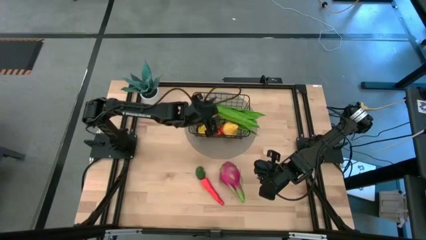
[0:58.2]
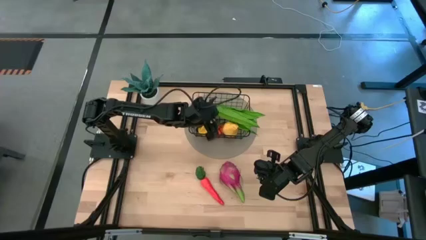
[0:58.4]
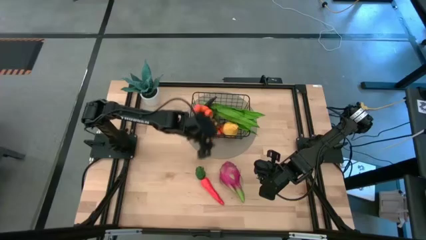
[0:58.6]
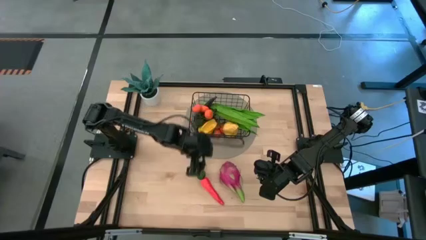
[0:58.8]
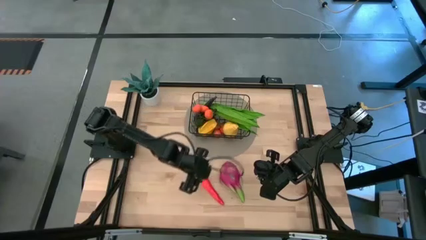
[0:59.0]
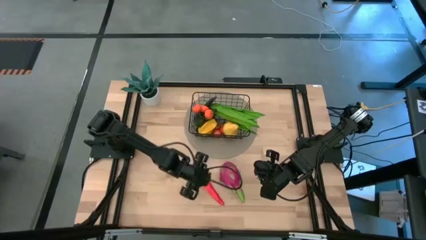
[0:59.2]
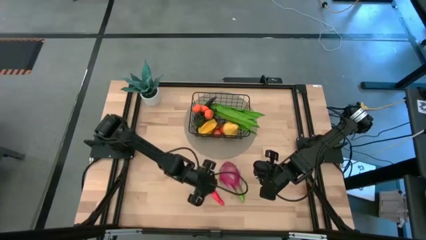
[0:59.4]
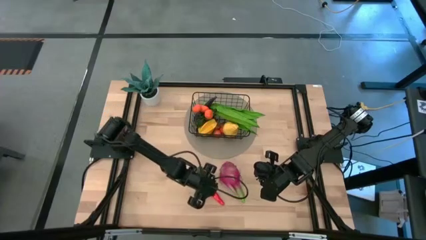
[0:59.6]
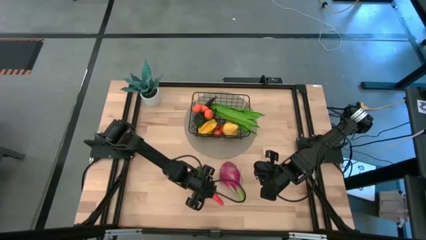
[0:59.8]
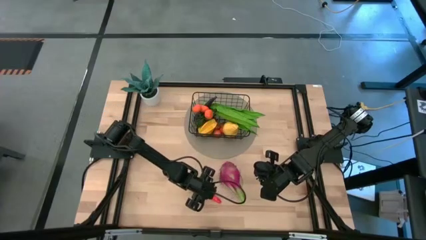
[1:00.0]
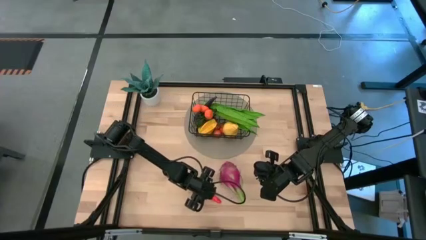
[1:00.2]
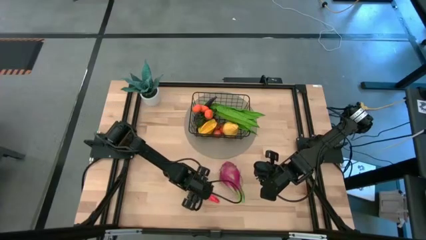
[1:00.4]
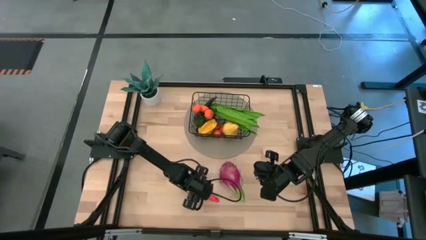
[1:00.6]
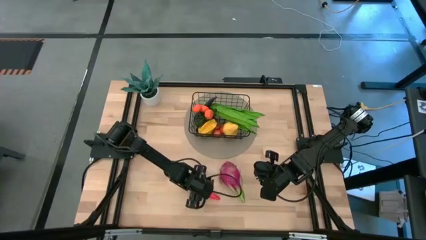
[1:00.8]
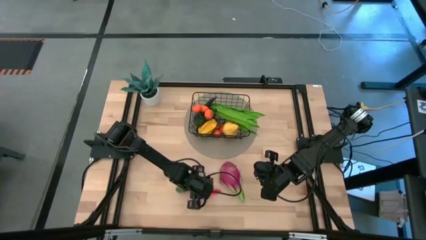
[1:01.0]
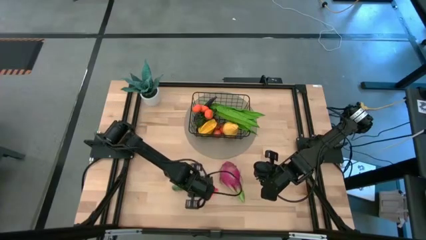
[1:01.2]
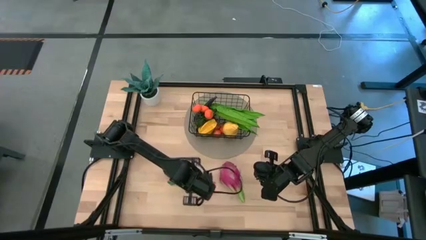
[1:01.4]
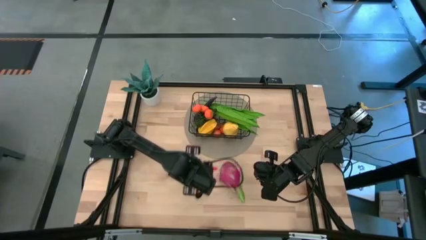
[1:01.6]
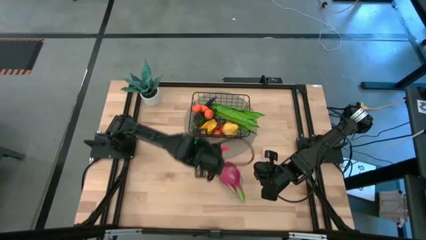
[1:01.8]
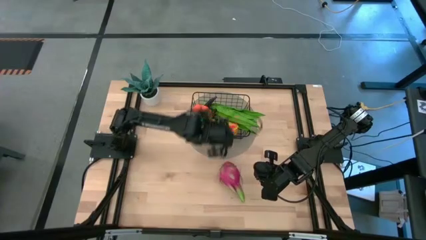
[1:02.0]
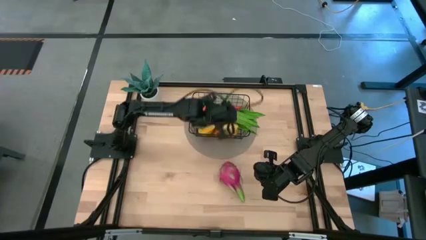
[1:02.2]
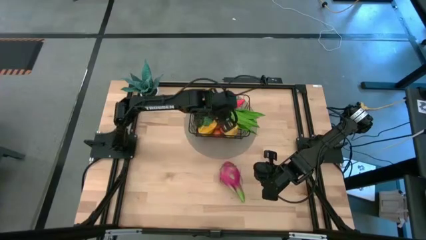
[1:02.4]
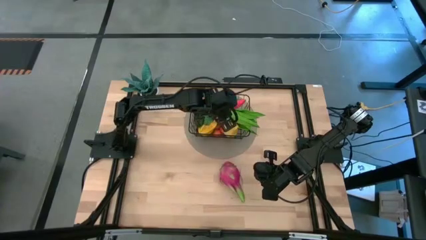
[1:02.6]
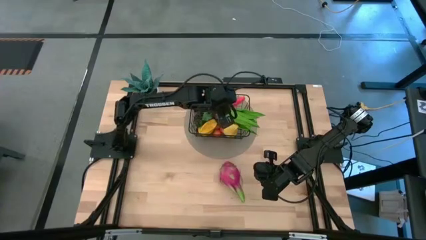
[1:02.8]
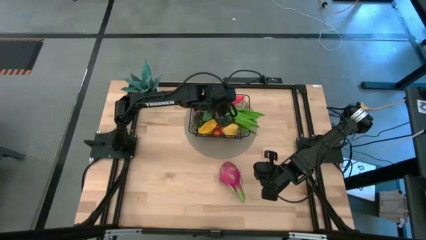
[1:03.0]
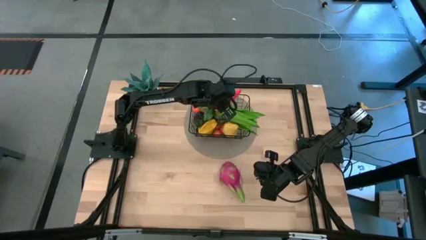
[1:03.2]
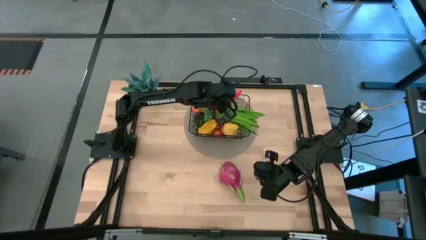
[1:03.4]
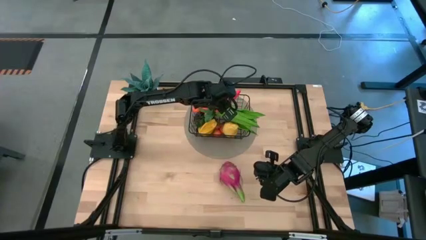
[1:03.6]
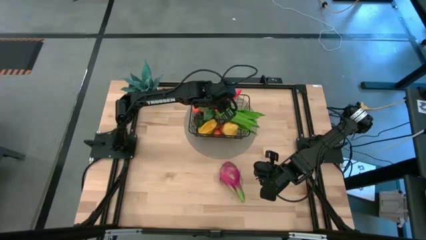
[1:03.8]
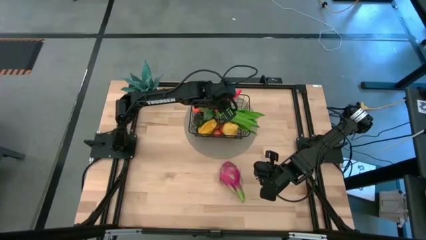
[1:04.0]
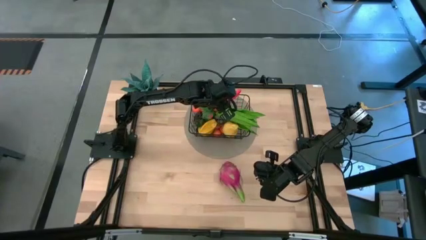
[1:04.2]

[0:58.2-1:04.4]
Task: Build produce basket
Put the carrot into the wire basket

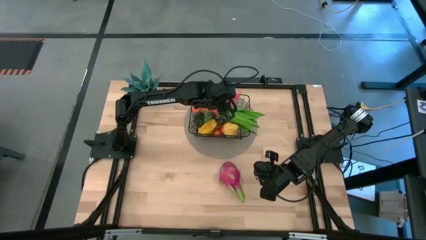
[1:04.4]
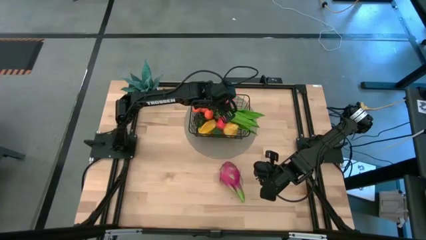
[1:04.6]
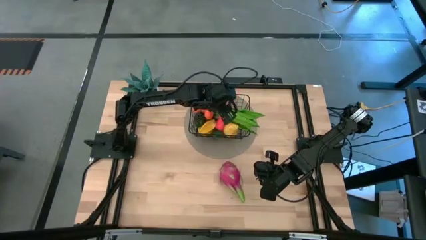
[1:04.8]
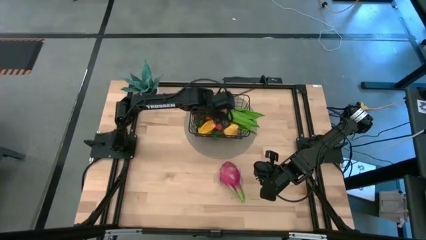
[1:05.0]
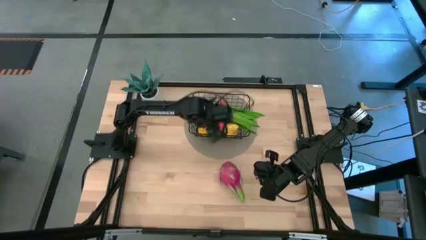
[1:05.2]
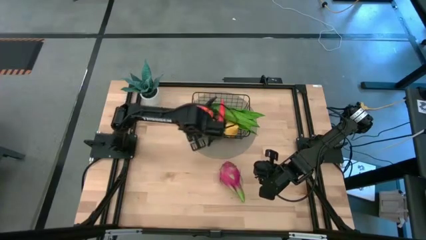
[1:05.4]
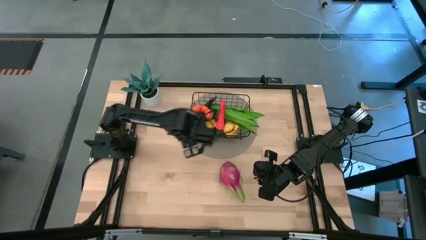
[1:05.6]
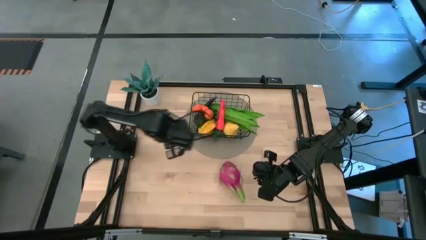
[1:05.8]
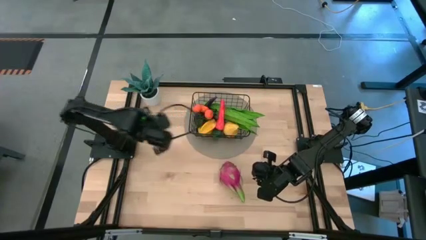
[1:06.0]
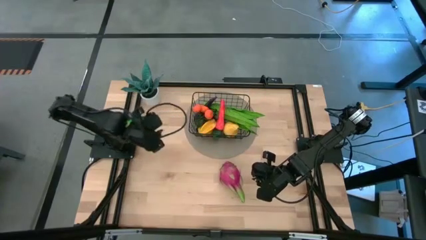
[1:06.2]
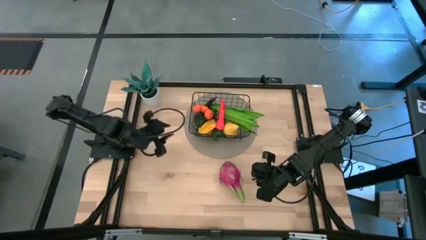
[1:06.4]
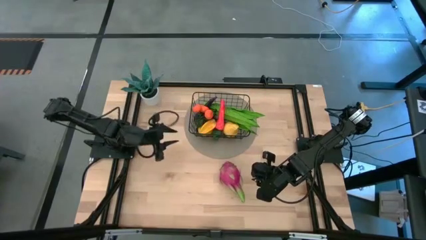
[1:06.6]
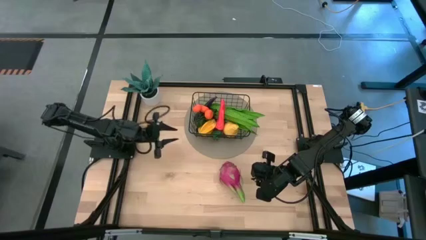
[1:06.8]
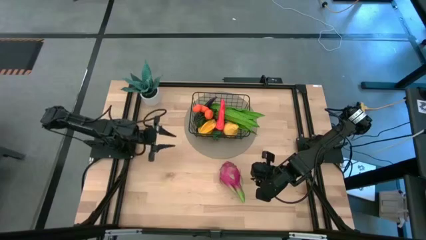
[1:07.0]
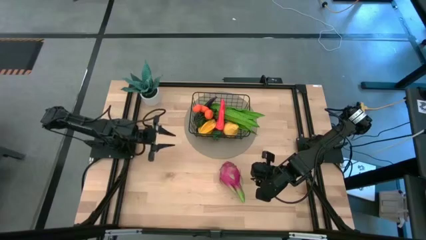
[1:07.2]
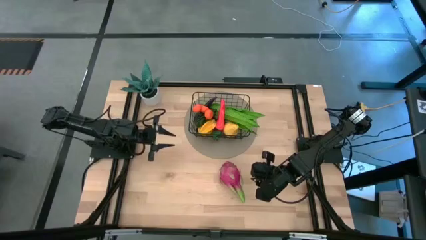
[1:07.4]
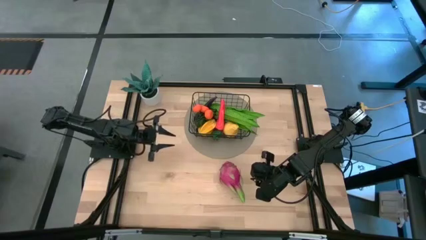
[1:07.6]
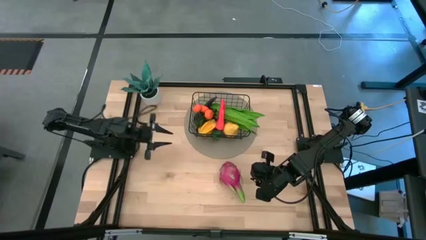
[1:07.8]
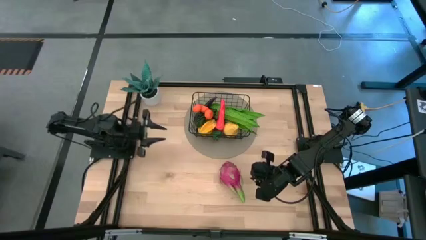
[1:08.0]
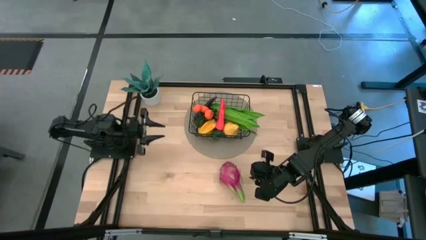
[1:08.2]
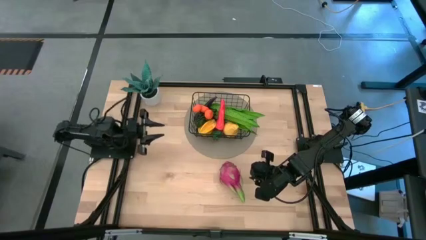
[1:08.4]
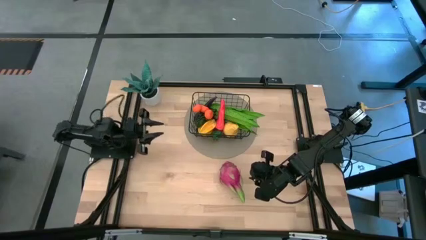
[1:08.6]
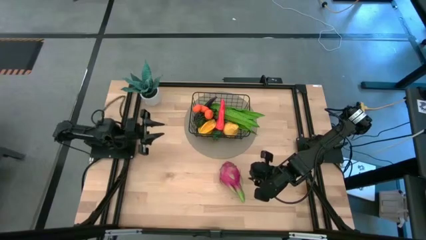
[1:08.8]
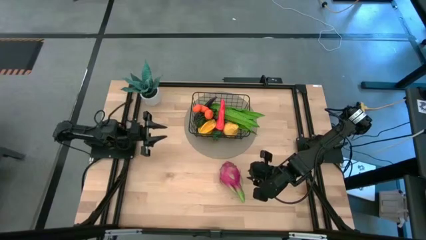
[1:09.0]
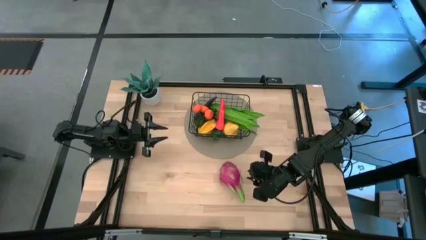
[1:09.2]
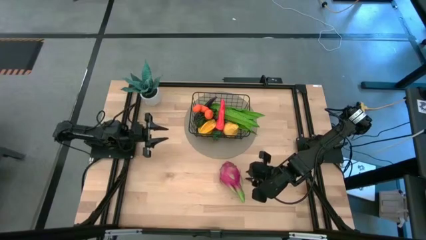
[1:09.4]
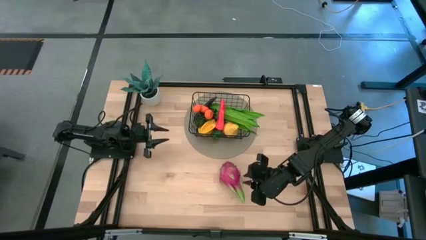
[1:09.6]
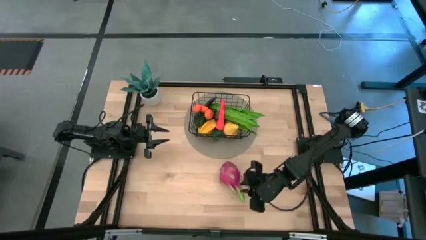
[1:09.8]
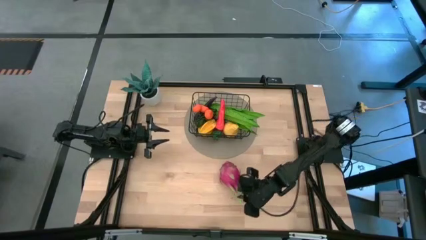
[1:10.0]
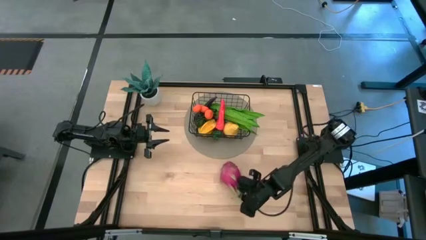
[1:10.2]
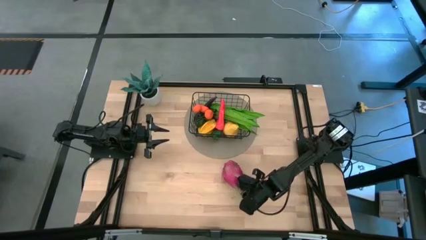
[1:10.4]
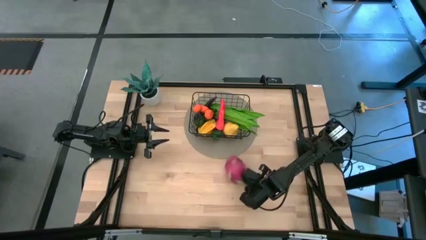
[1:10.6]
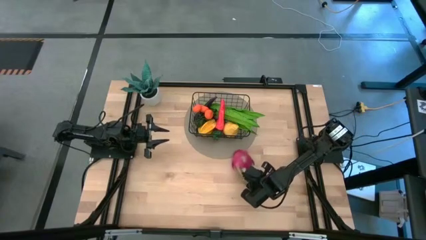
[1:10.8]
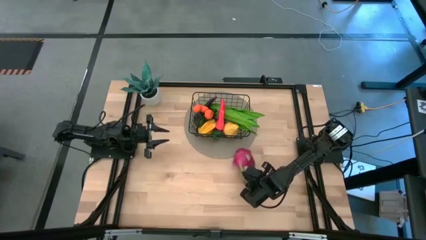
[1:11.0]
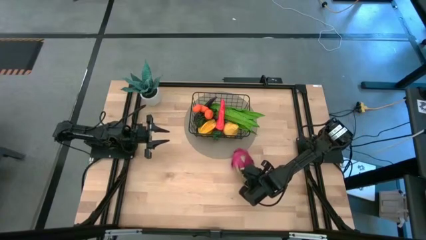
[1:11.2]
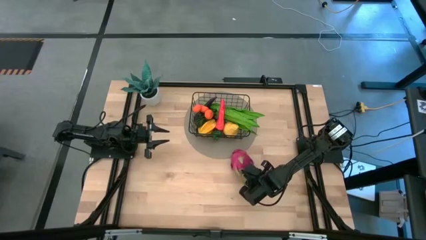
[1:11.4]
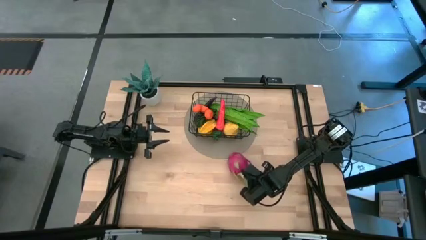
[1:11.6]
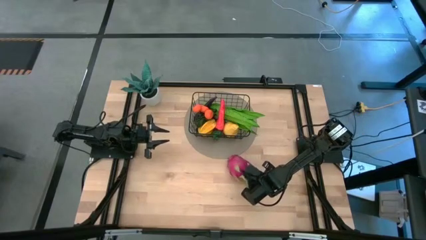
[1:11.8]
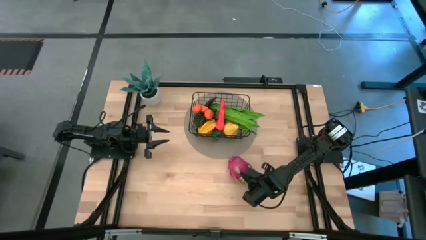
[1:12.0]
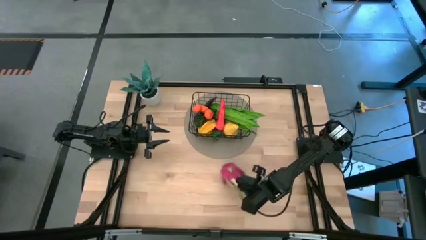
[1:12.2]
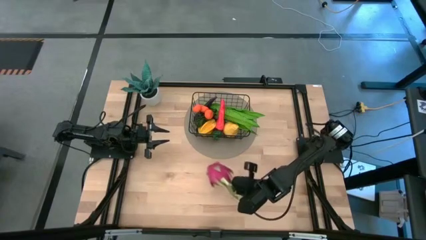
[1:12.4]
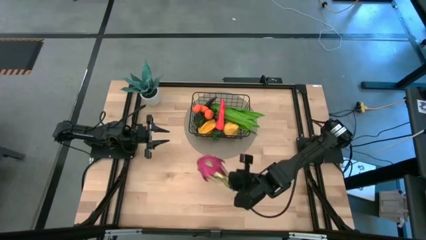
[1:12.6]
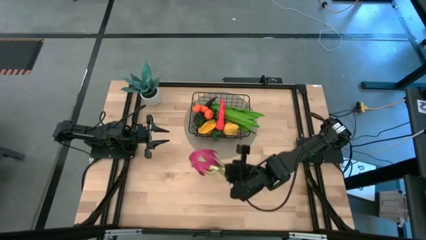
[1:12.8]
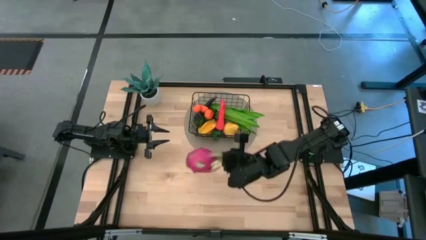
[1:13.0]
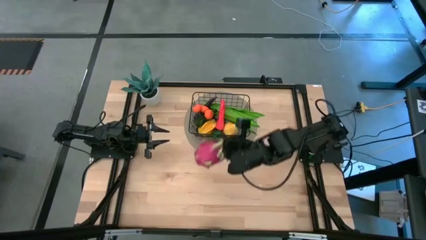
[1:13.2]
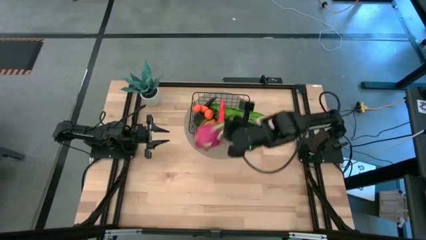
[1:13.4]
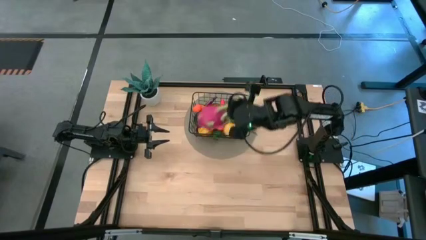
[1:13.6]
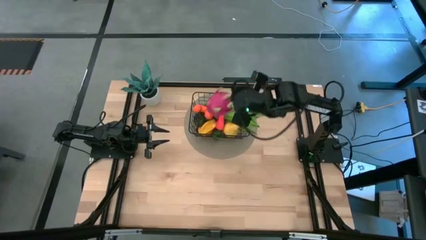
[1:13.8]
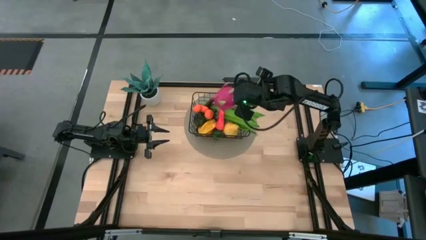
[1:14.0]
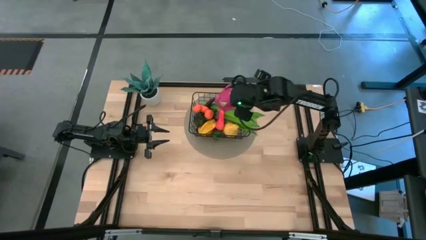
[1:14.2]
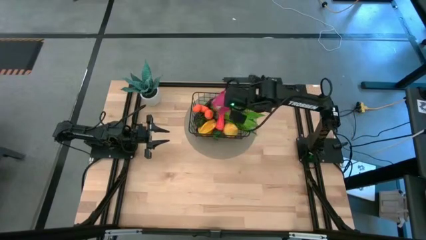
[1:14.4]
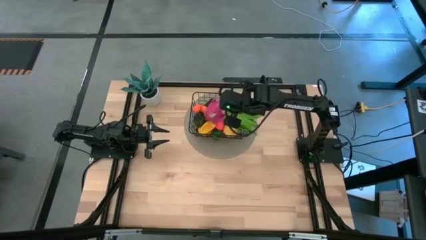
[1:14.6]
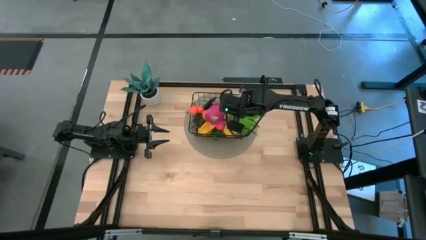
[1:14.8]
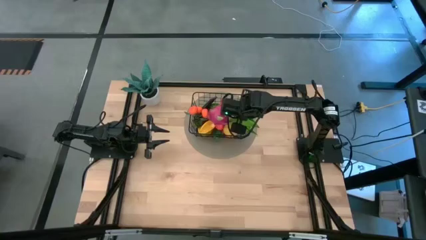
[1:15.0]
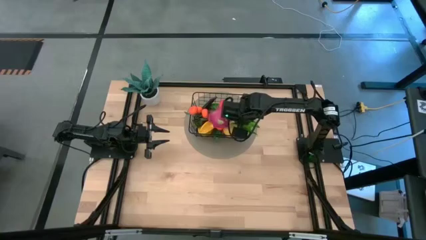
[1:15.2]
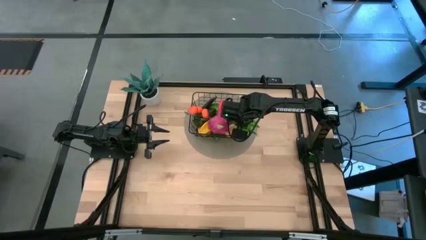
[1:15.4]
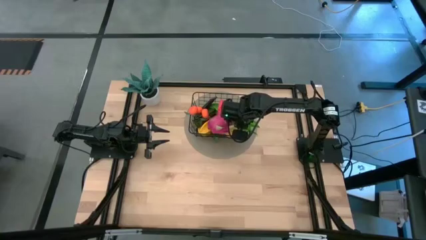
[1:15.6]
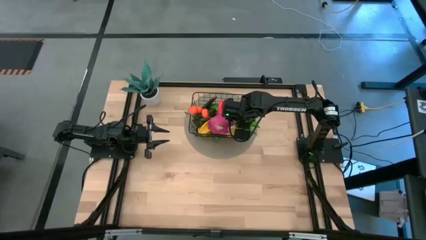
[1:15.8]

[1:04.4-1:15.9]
Put the dragon fruit into the wire basket
